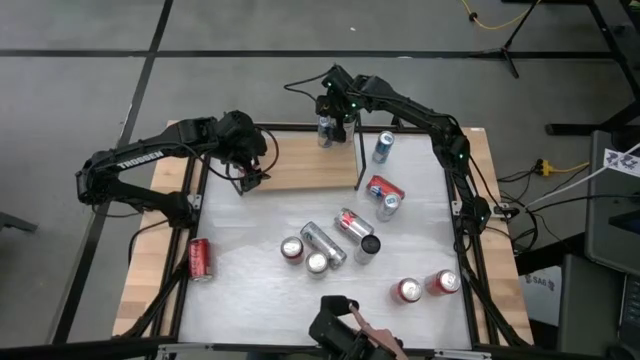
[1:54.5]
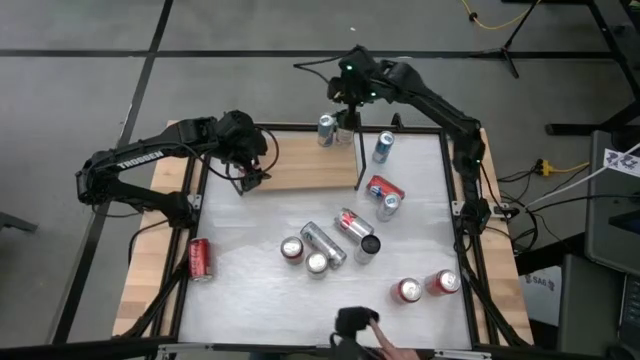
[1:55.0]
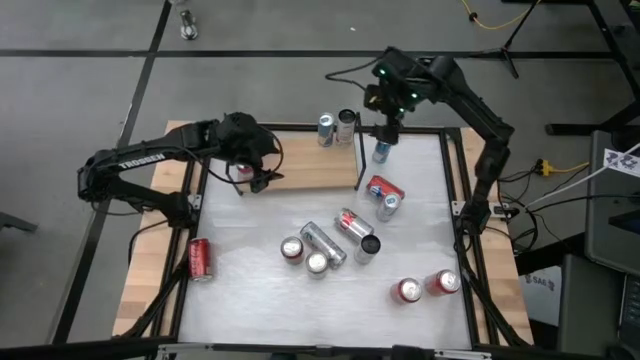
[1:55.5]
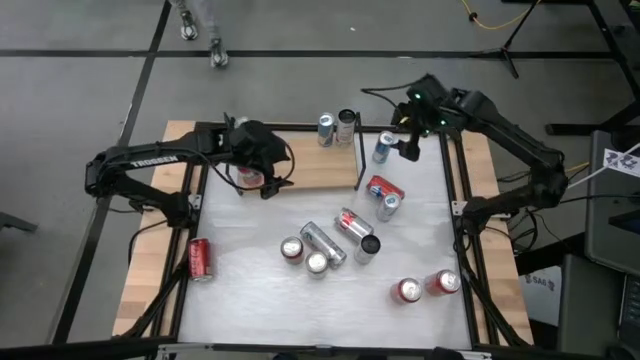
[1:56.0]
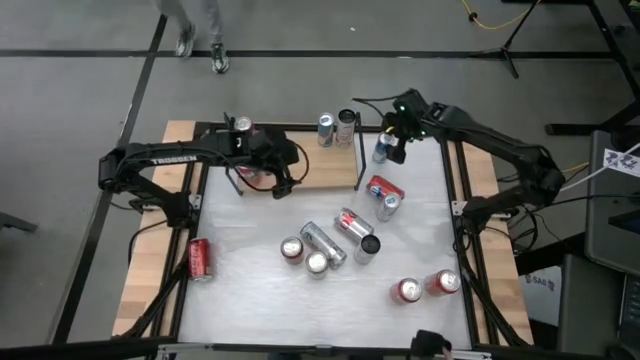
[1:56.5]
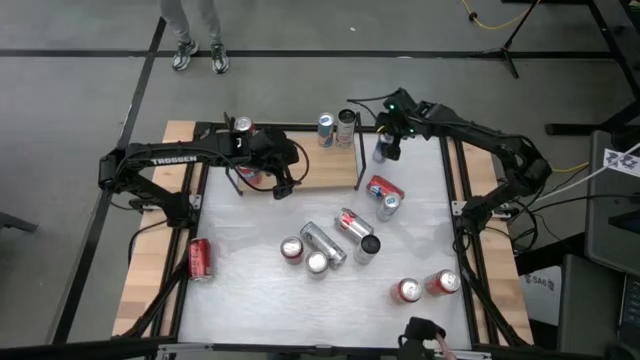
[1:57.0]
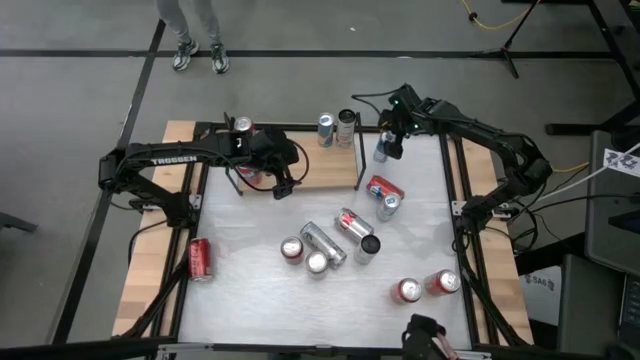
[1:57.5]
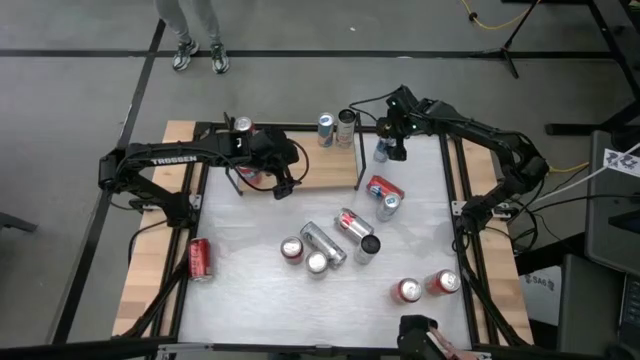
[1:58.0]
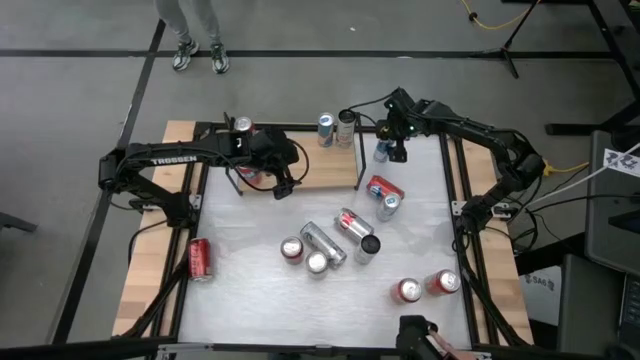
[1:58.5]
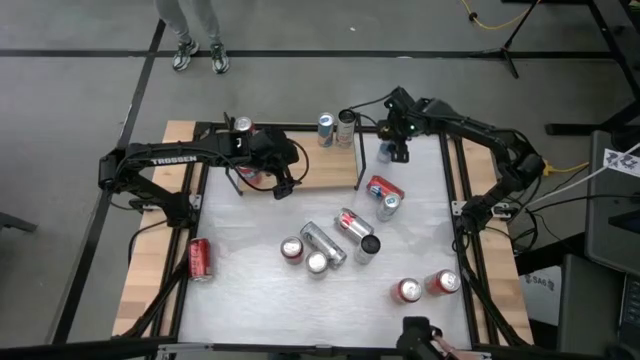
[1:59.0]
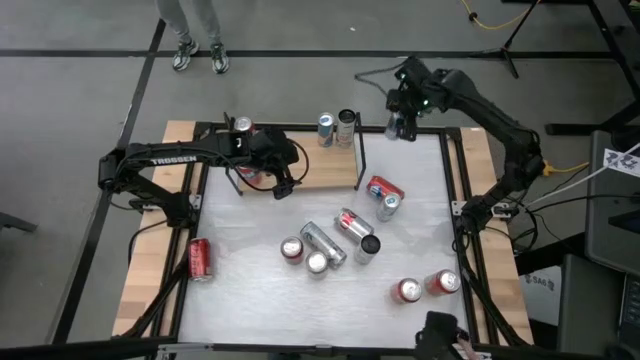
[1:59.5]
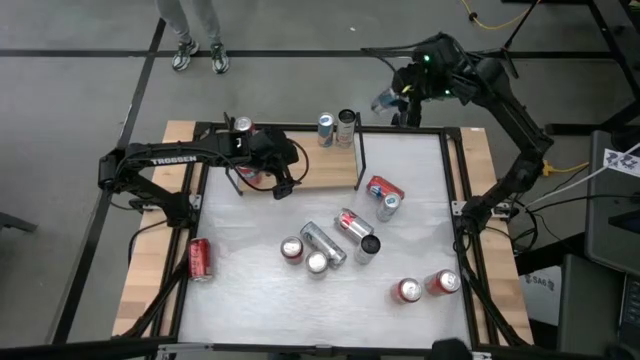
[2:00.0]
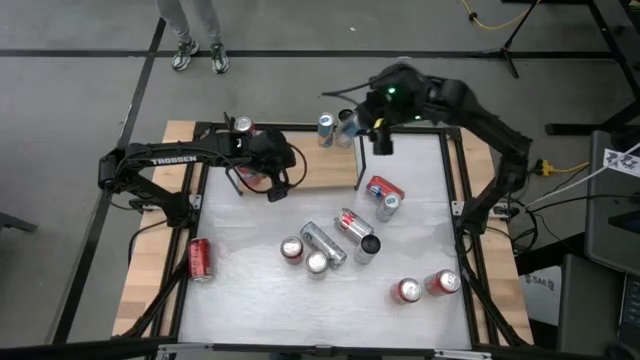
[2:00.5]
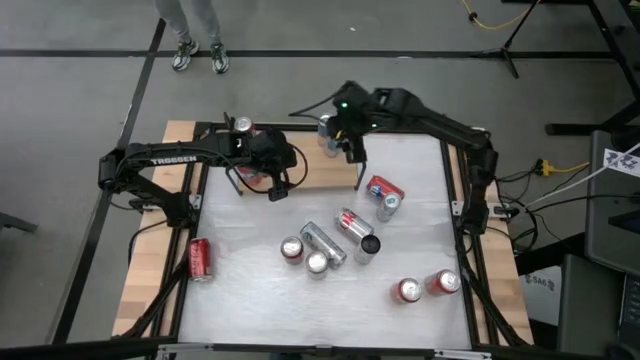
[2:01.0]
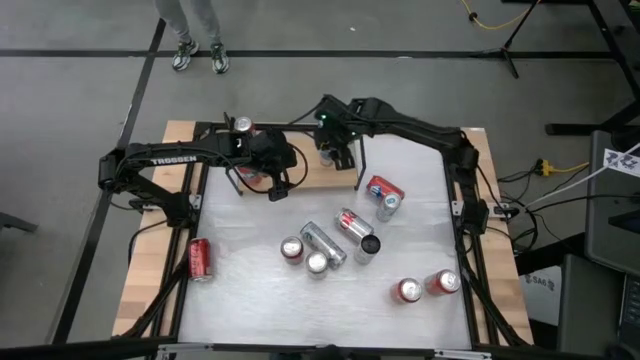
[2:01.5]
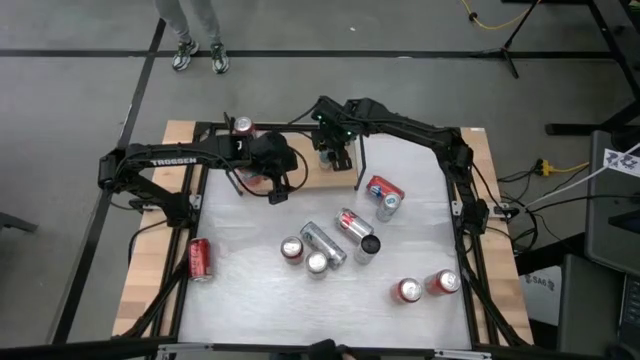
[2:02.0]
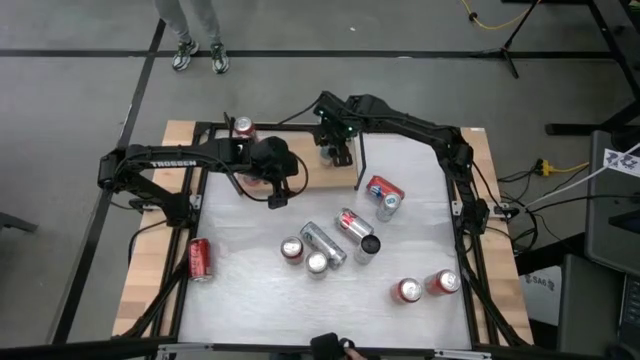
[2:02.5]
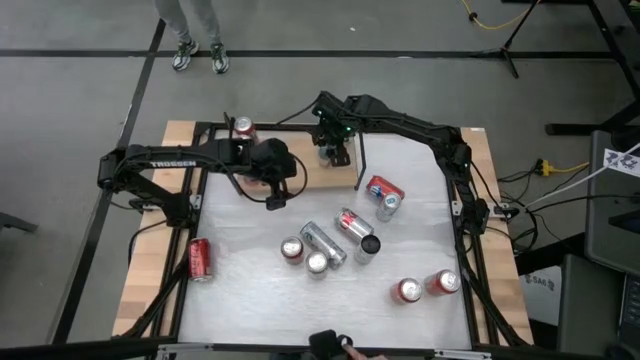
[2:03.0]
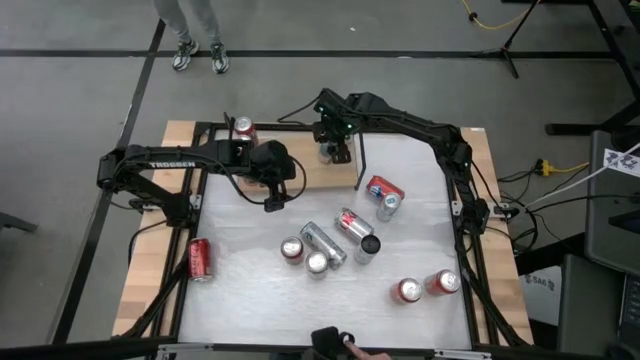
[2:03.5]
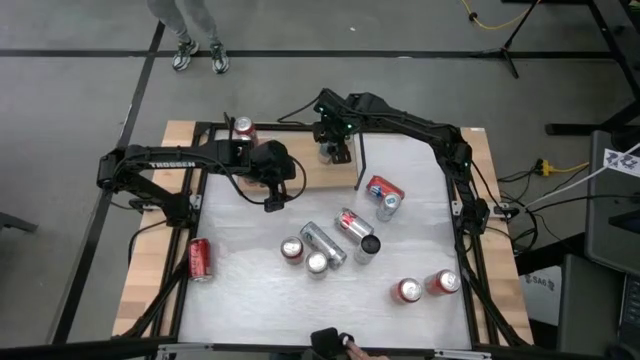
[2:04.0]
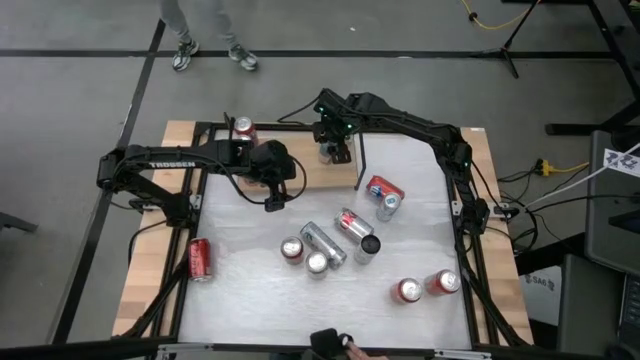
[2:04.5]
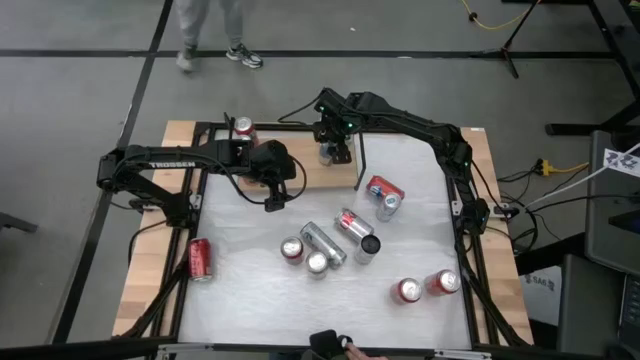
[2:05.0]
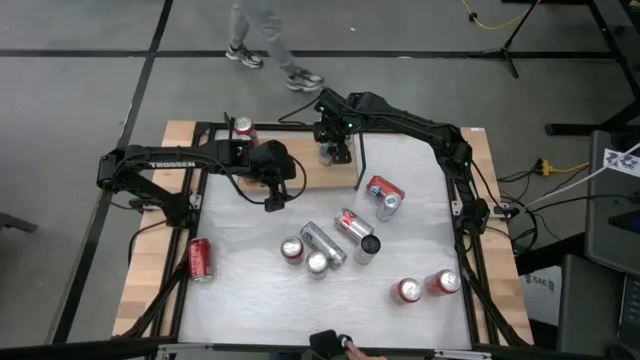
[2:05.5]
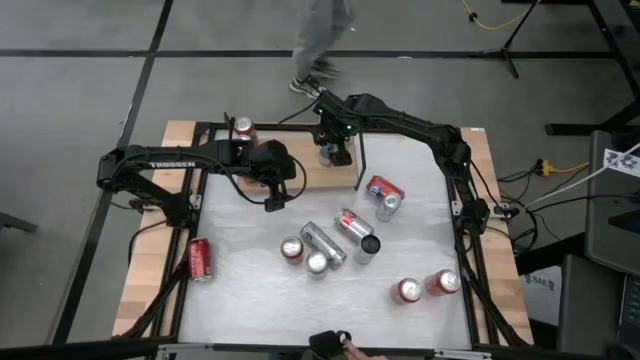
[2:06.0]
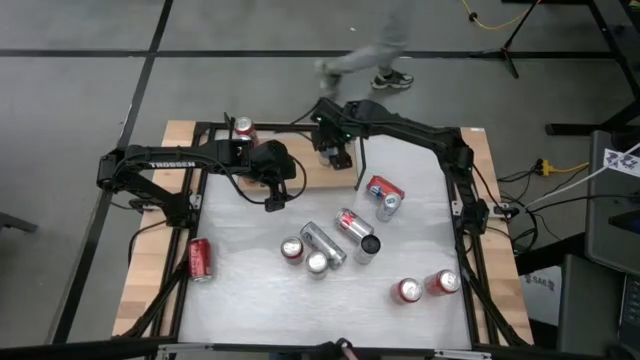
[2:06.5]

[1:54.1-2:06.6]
Task: Place canned beverage on shelf
Put the blue soda can on the shelf aligned with the other blue soda can

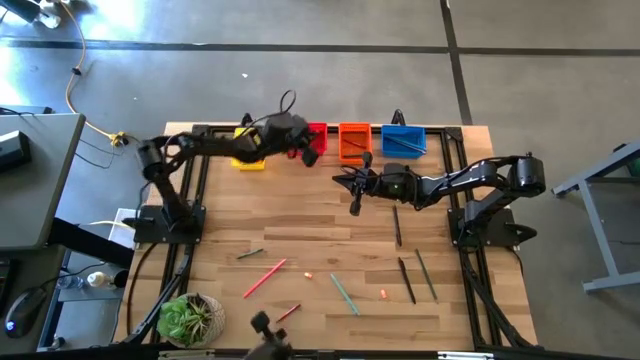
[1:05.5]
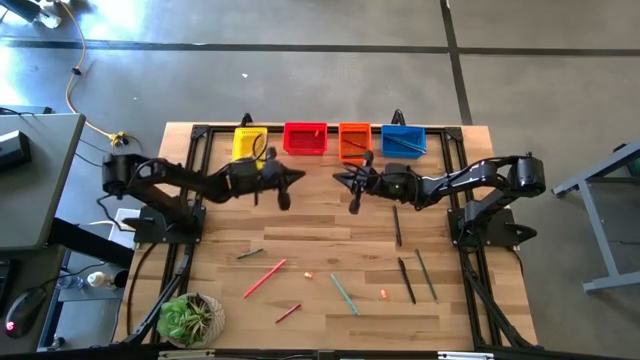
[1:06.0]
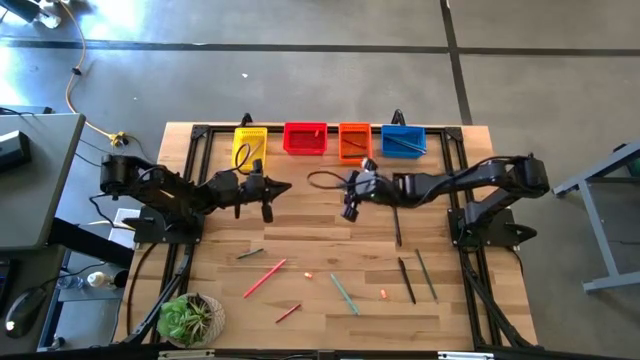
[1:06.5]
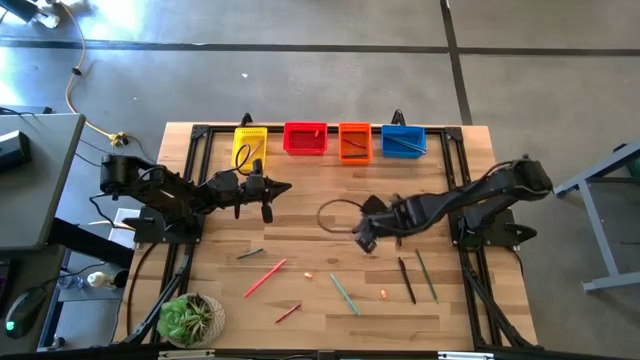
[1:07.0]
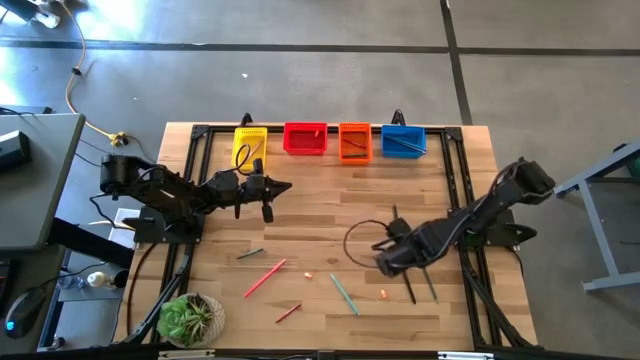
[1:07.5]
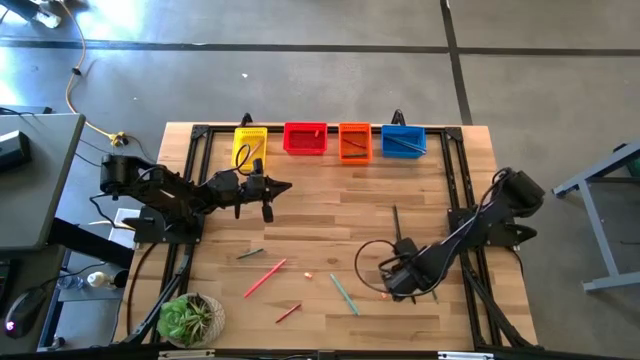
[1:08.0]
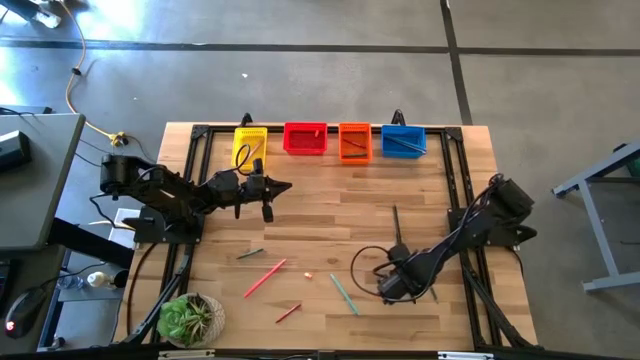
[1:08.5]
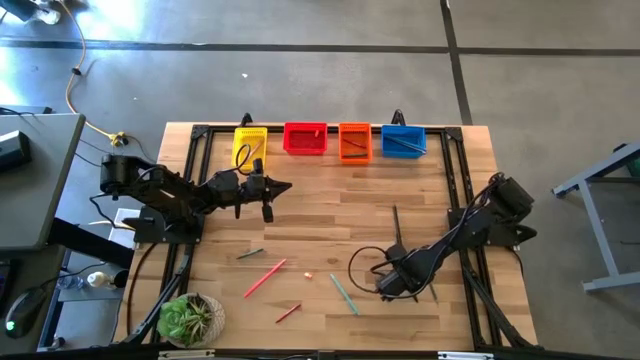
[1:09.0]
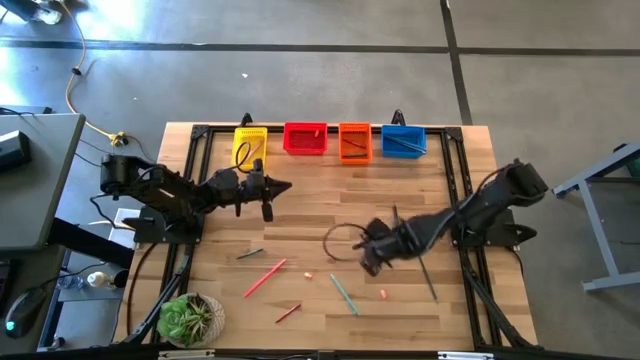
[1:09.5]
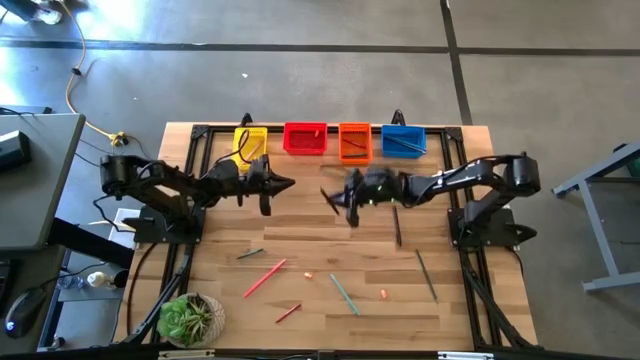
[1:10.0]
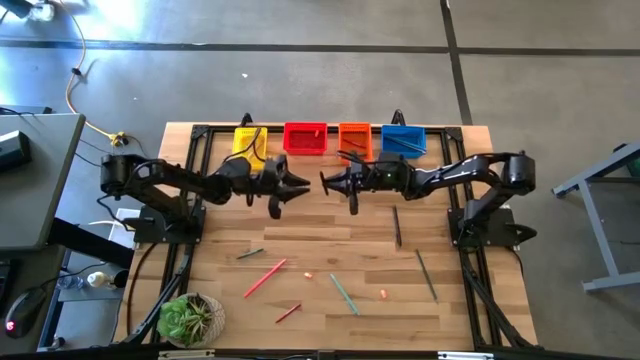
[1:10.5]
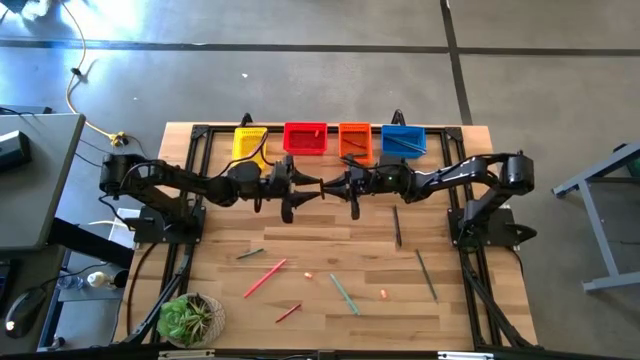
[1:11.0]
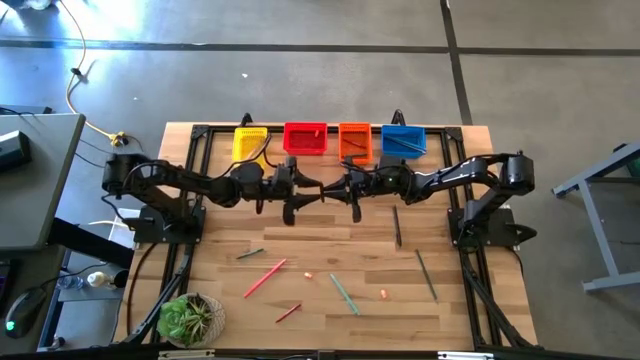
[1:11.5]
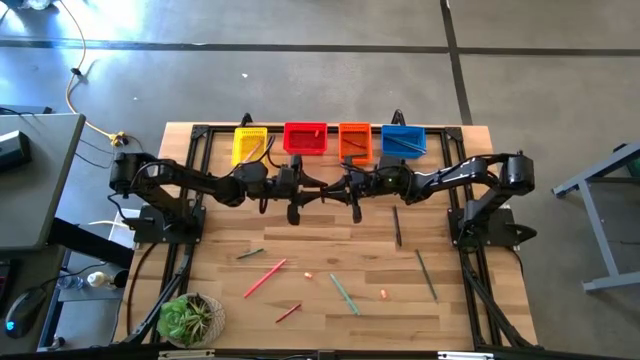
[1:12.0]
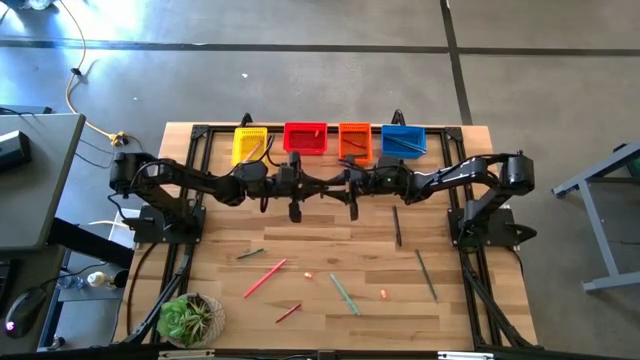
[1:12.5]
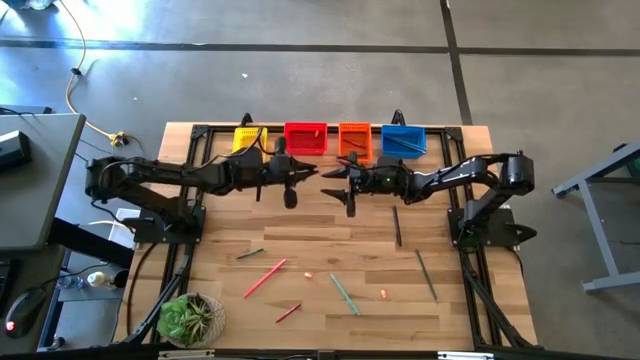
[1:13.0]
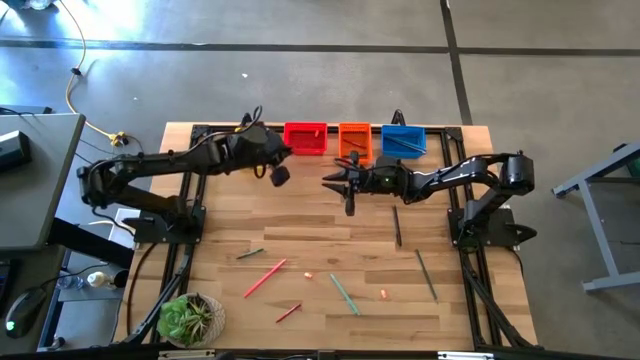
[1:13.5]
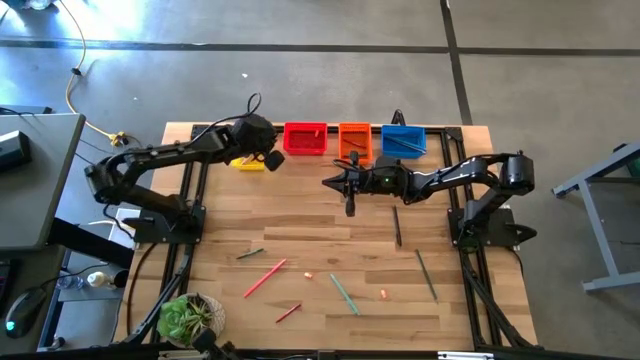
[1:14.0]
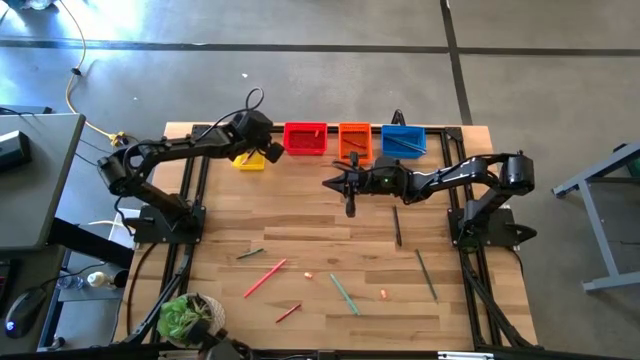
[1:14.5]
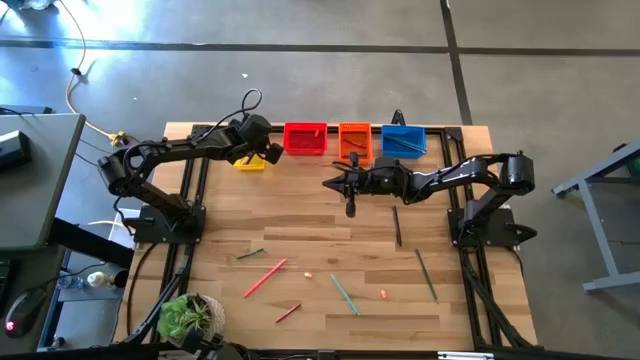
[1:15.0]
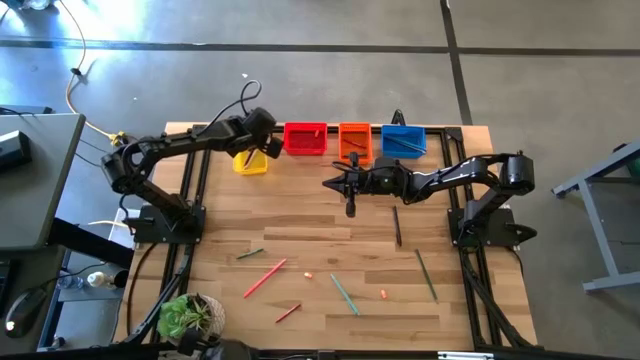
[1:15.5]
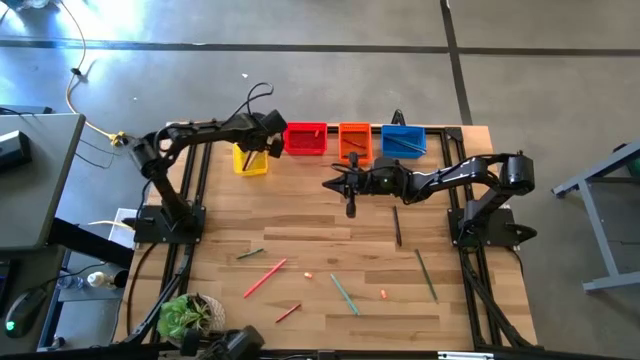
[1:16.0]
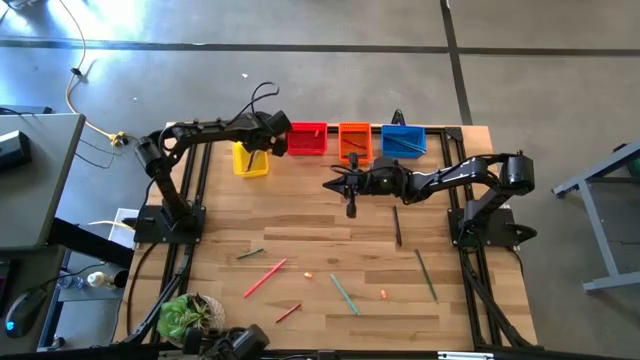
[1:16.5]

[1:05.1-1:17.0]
Task: Sort crayons/erasers/pens/pencils in bins
Put the bottom black pen into the yellow basket
